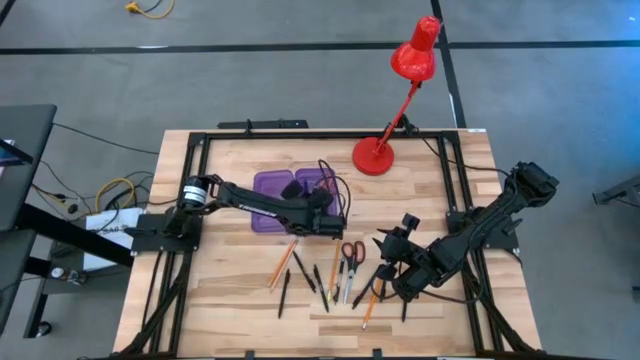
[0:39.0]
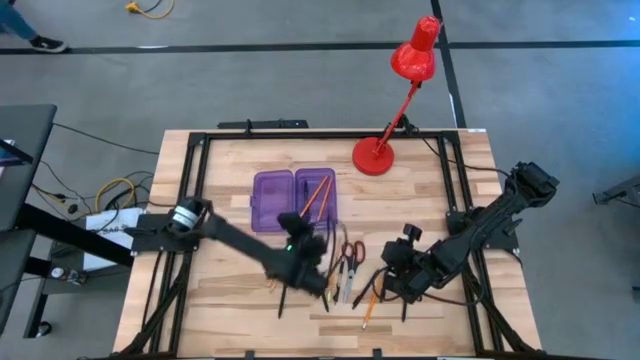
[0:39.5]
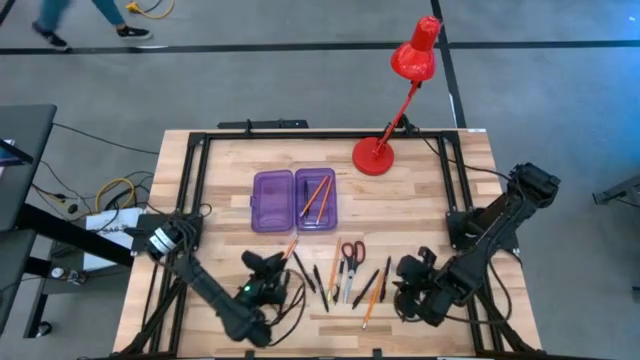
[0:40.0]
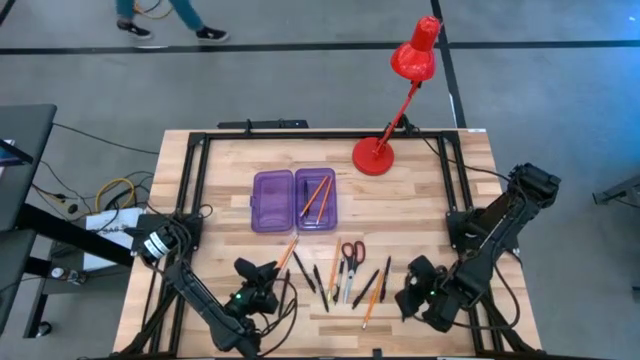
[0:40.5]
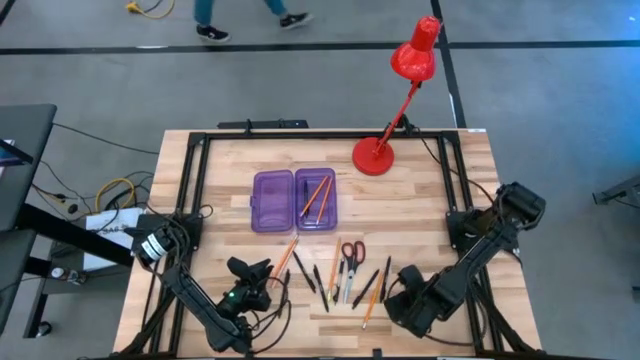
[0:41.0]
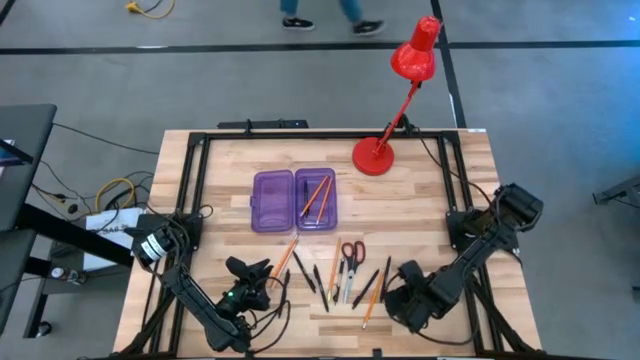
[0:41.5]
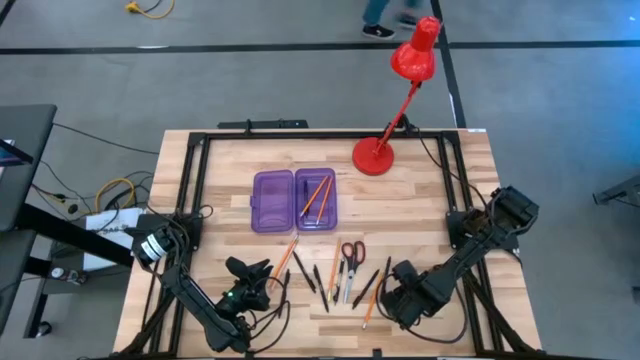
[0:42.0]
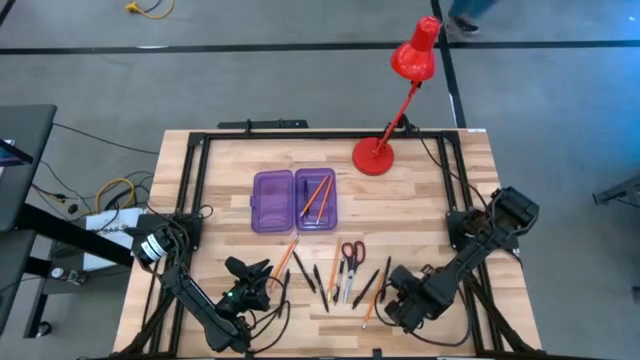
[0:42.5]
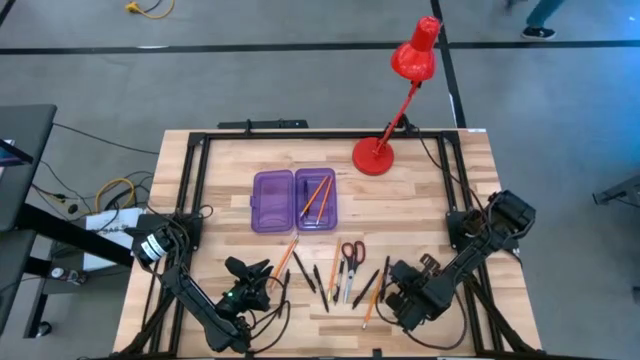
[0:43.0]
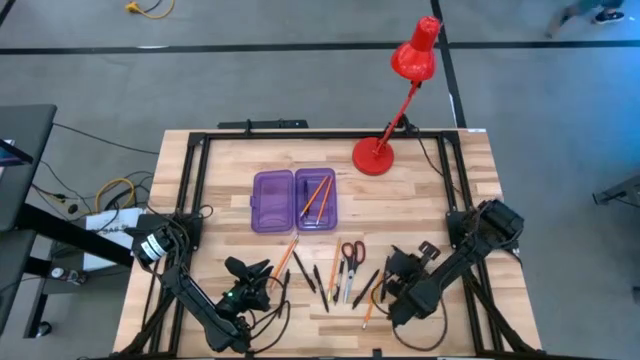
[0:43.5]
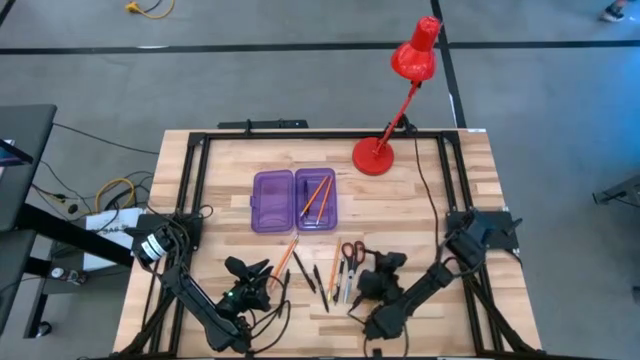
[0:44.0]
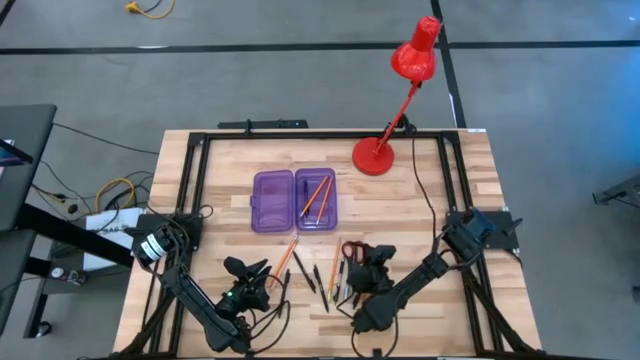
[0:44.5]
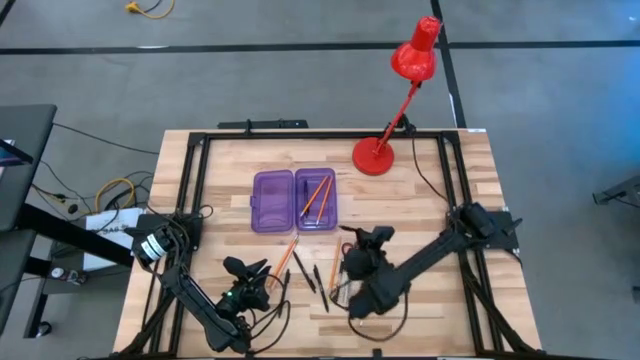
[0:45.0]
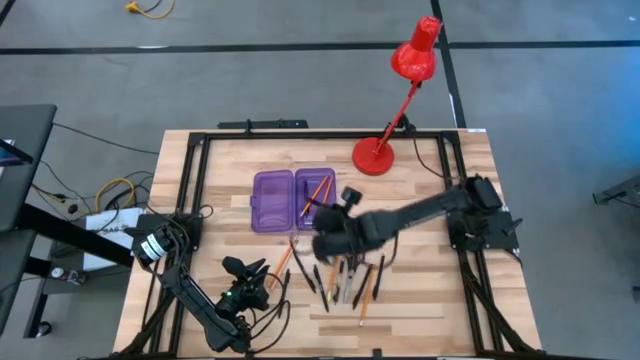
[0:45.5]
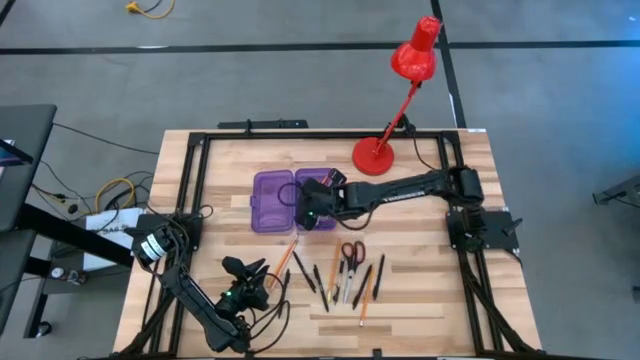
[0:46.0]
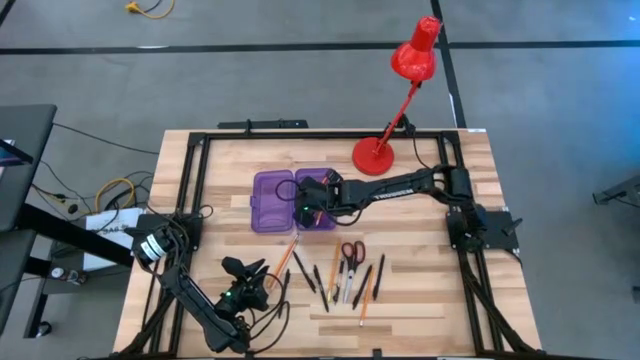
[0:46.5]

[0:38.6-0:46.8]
Task: Pick & place school supplies into a supply box
Put the black pen into the violet supply box

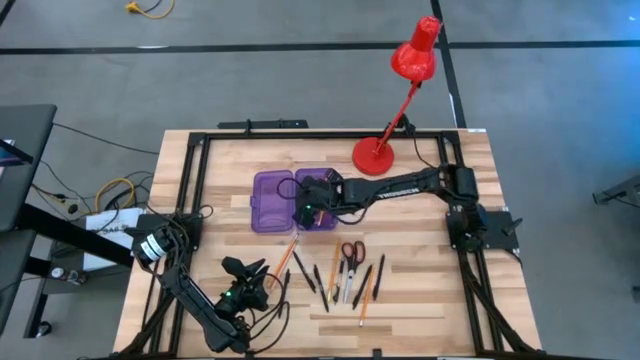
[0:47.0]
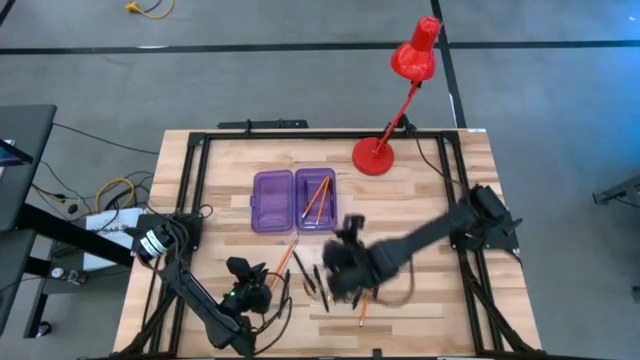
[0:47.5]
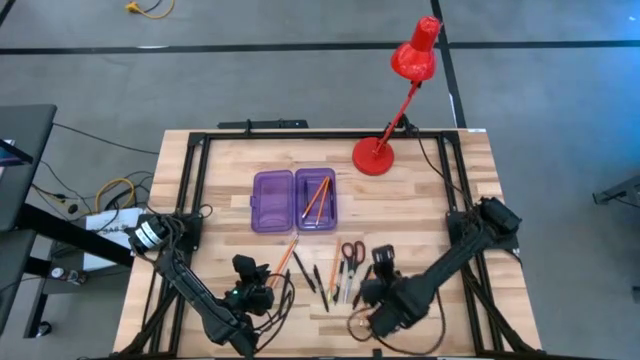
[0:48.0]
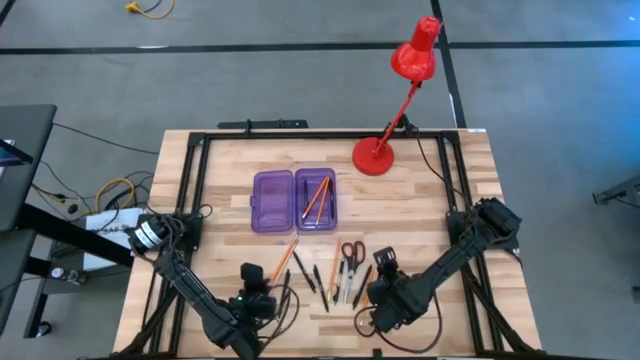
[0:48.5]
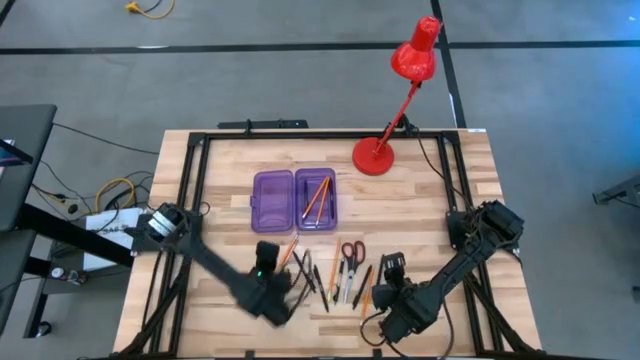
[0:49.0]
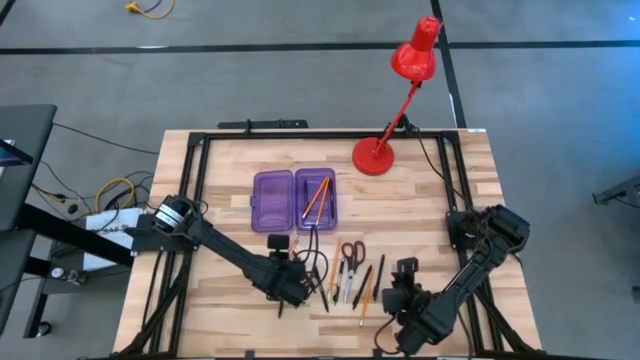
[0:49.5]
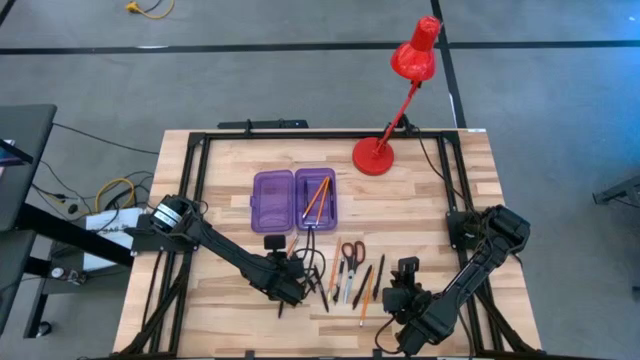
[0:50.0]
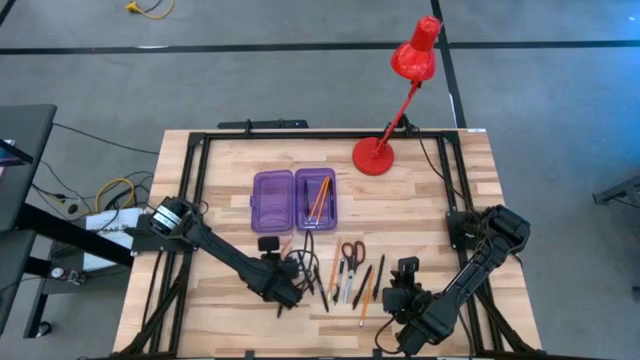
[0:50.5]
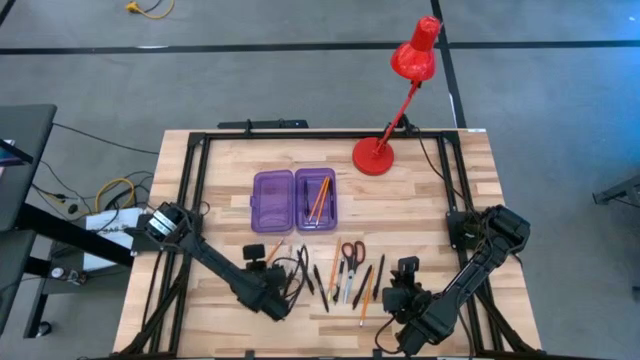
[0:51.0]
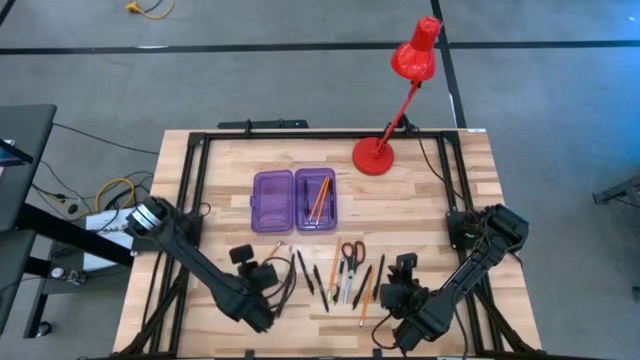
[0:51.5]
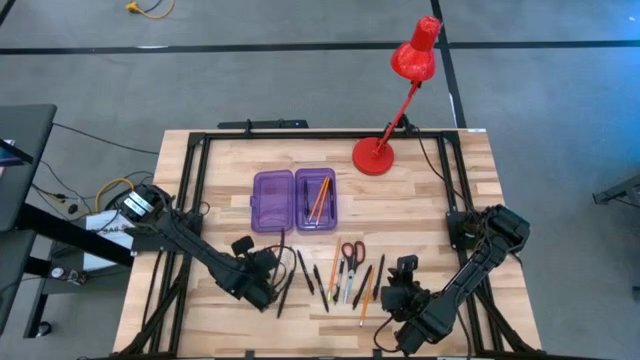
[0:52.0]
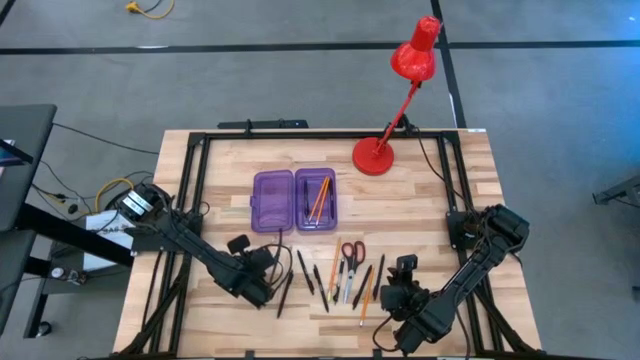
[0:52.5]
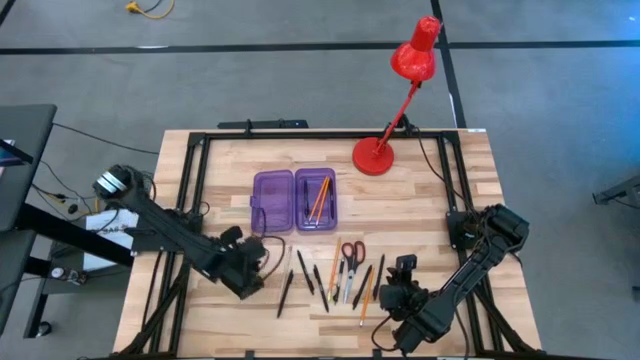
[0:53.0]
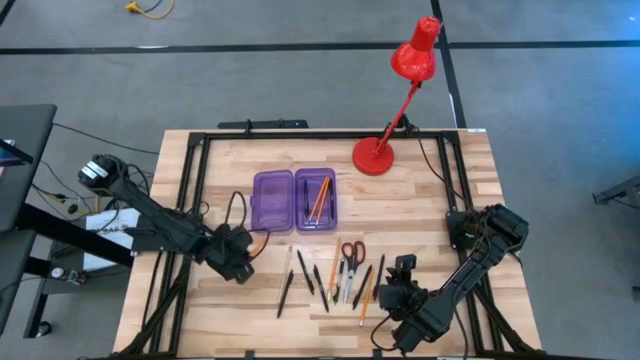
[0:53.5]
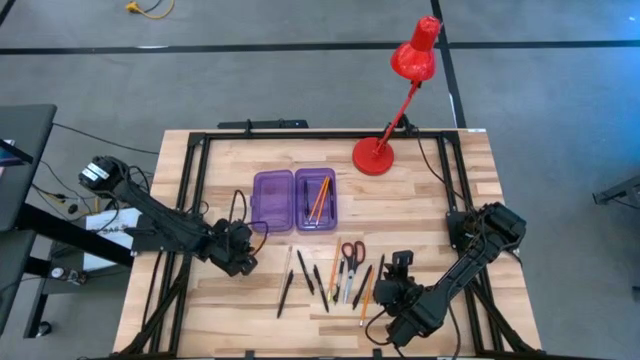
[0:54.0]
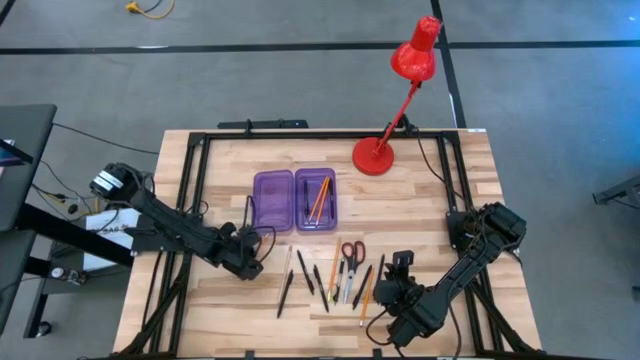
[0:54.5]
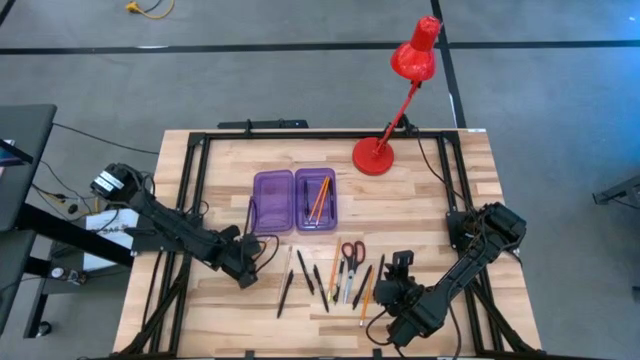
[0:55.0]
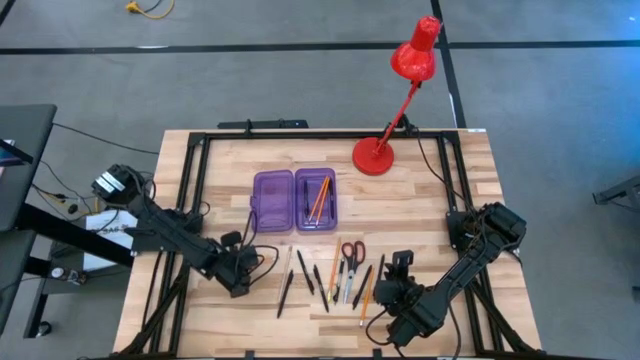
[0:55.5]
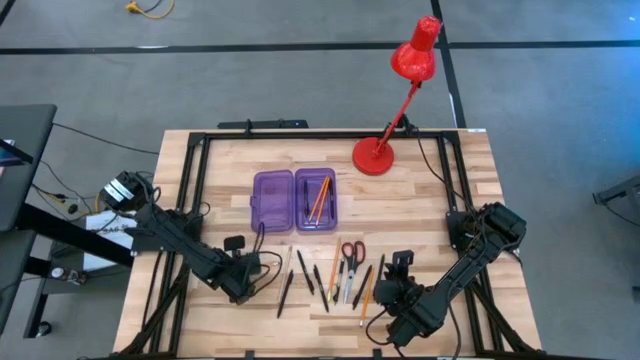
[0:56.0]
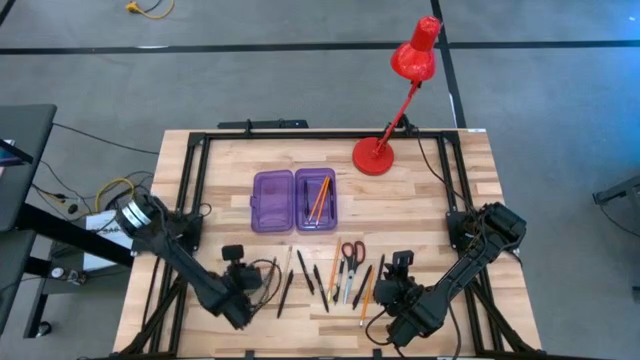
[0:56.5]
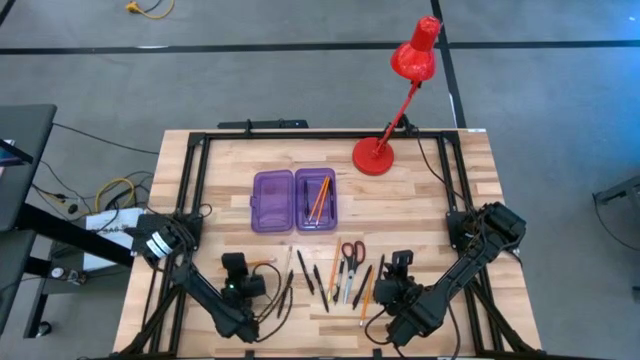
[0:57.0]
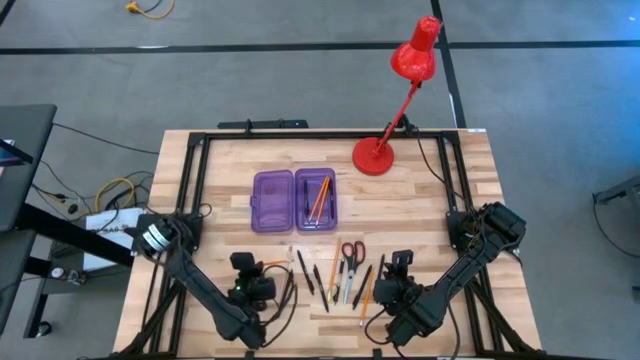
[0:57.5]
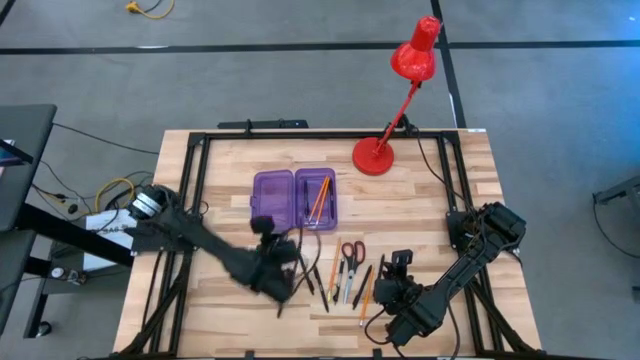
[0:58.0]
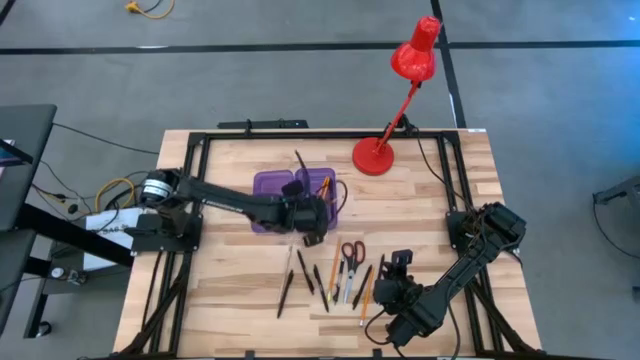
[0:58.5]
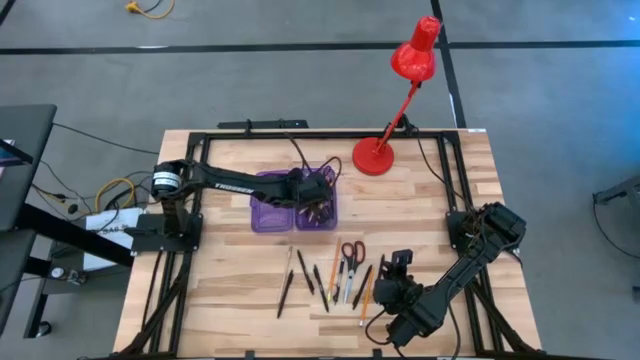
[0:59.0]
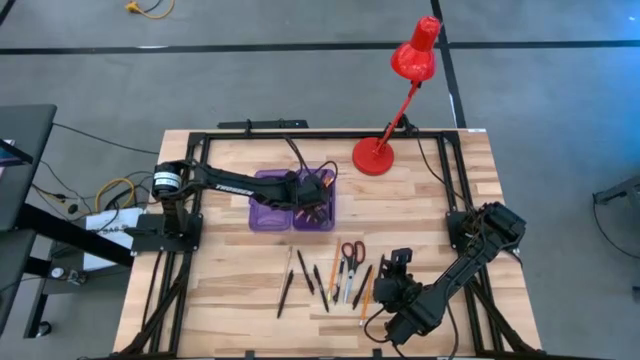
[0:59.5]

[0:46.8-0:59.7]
Put the orange pencil into the violet supply box
